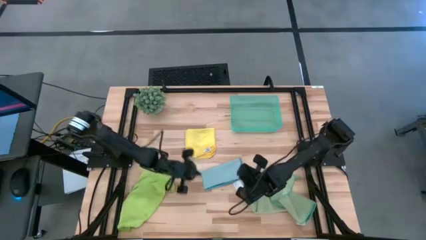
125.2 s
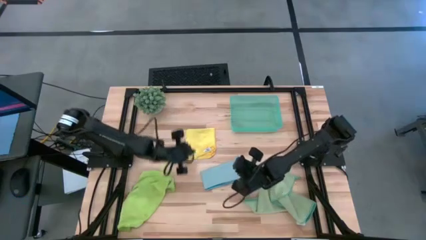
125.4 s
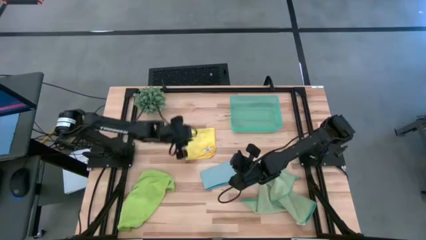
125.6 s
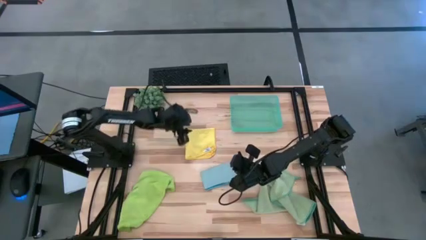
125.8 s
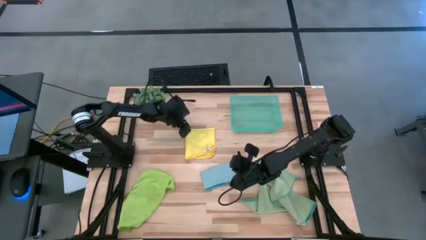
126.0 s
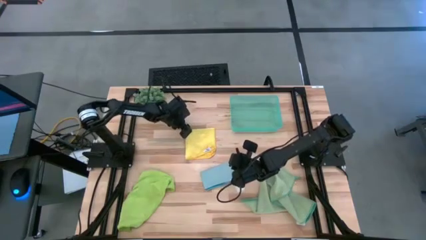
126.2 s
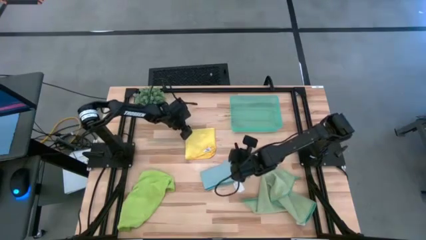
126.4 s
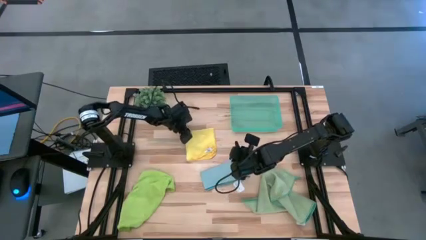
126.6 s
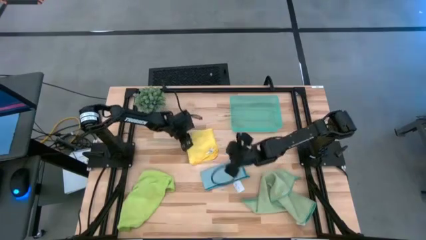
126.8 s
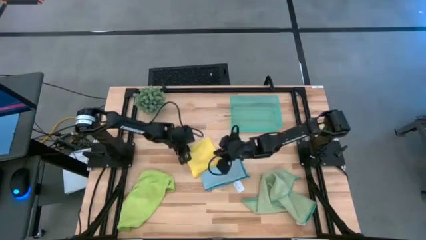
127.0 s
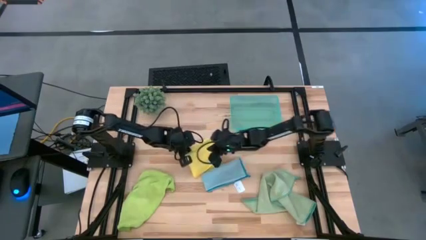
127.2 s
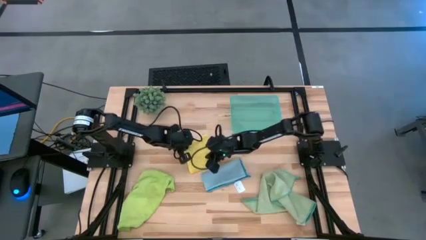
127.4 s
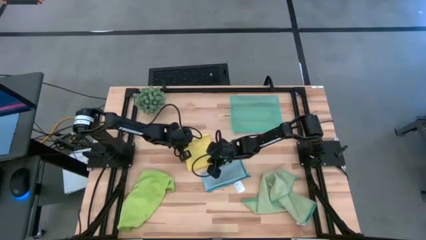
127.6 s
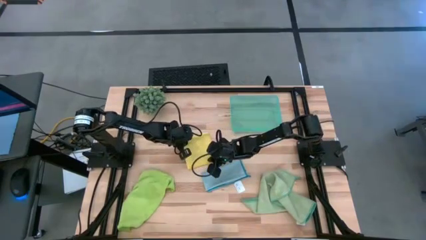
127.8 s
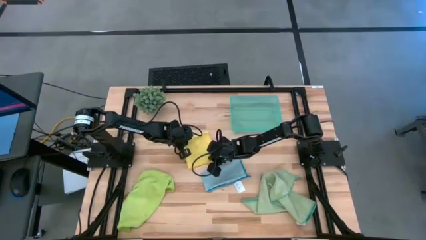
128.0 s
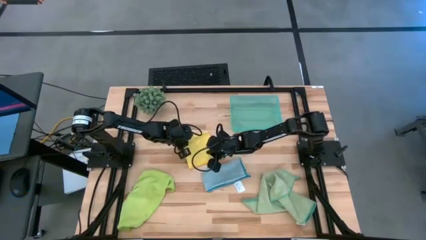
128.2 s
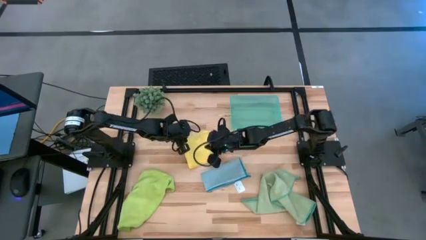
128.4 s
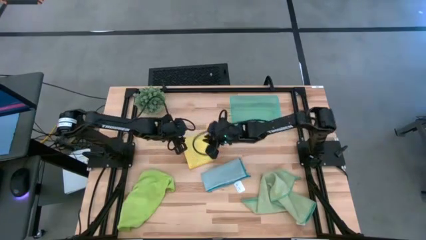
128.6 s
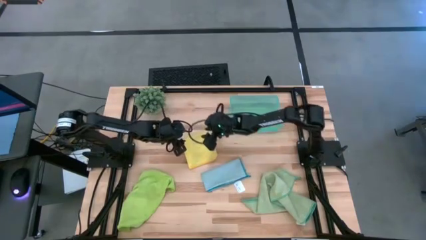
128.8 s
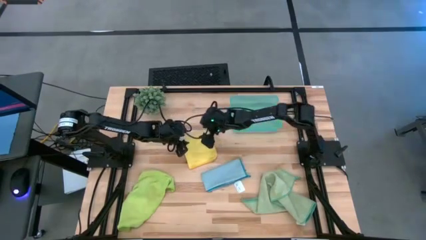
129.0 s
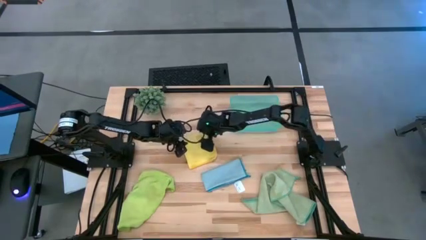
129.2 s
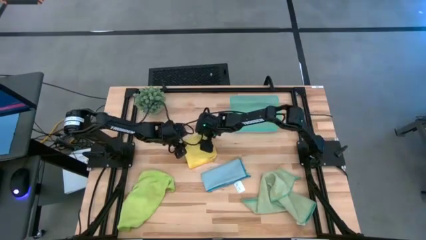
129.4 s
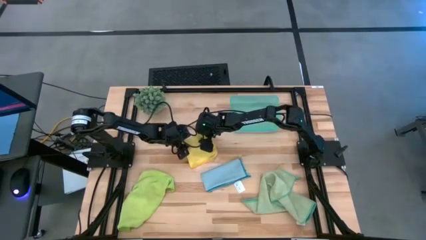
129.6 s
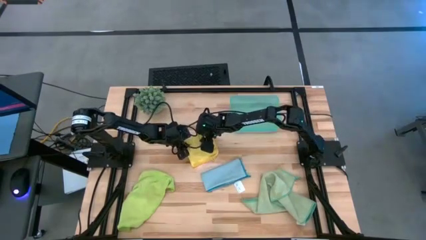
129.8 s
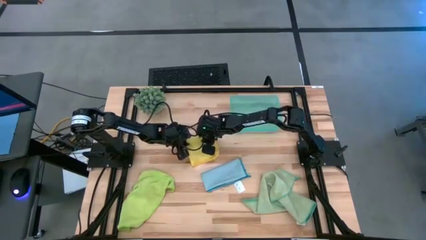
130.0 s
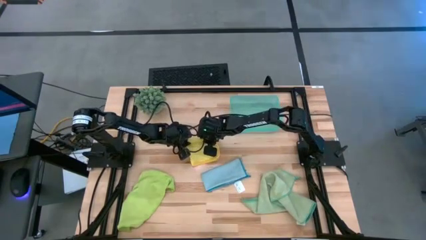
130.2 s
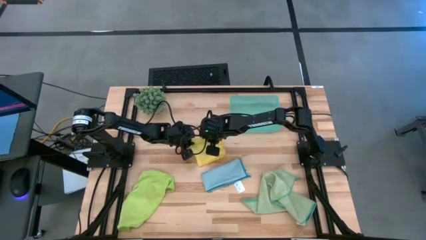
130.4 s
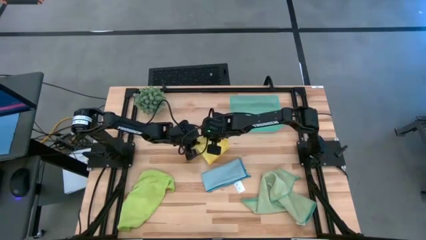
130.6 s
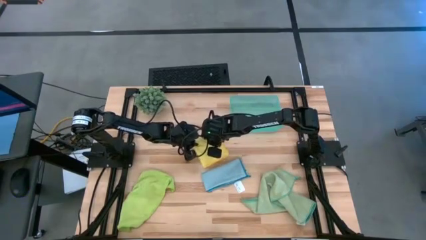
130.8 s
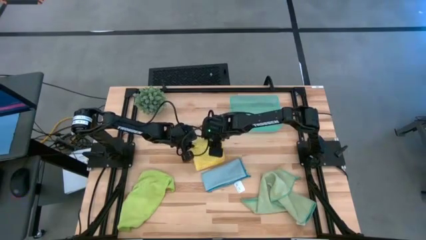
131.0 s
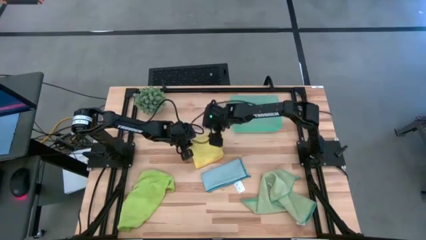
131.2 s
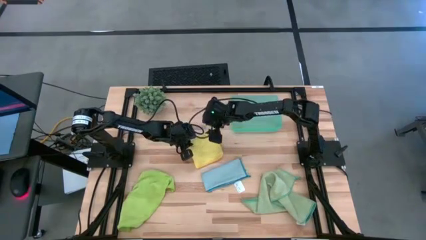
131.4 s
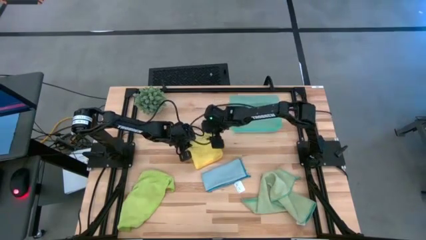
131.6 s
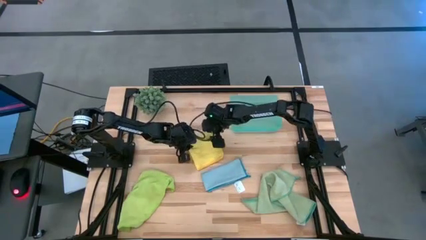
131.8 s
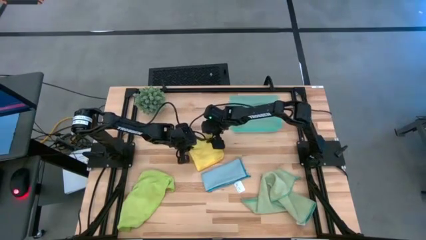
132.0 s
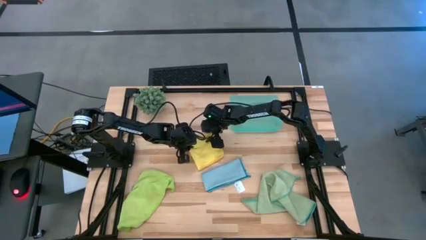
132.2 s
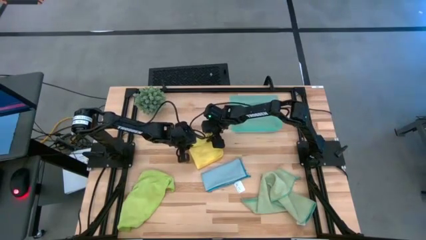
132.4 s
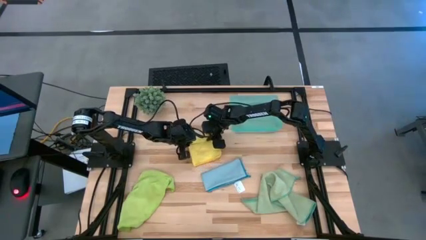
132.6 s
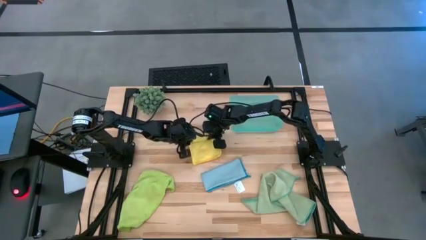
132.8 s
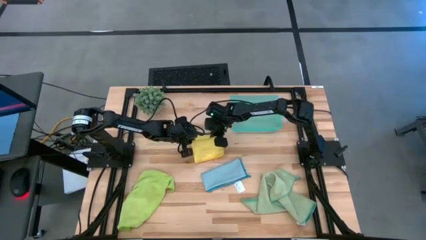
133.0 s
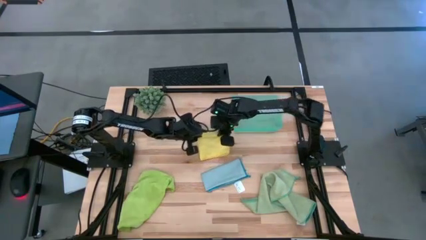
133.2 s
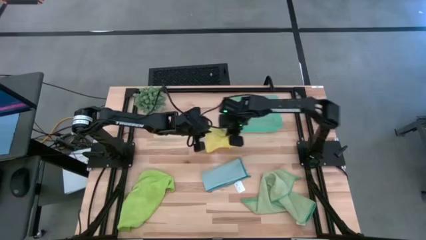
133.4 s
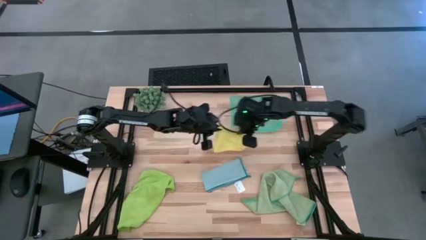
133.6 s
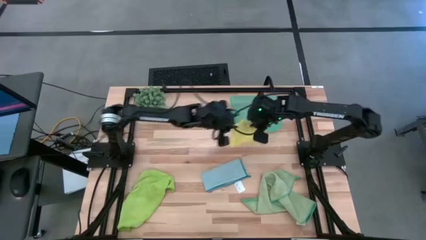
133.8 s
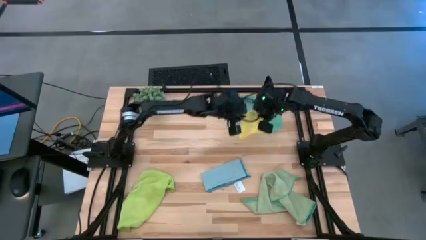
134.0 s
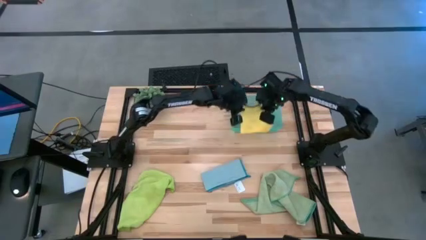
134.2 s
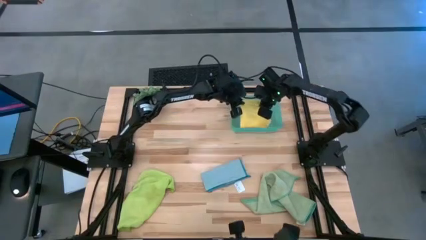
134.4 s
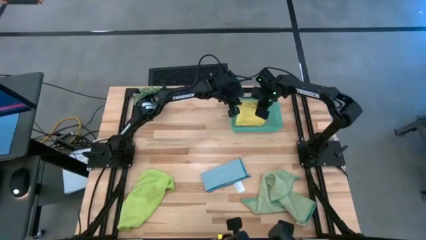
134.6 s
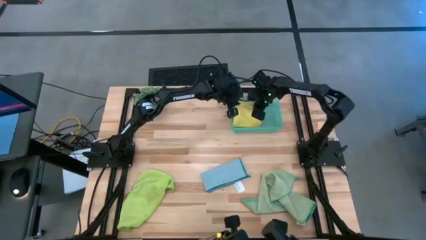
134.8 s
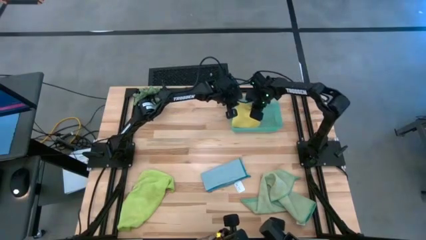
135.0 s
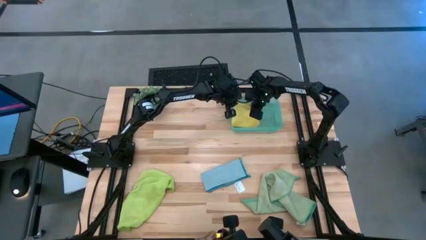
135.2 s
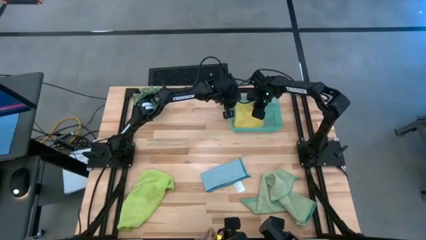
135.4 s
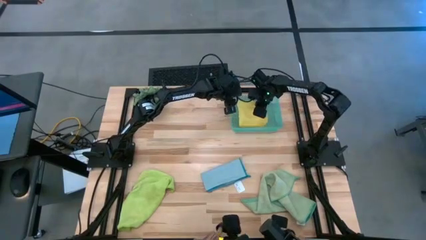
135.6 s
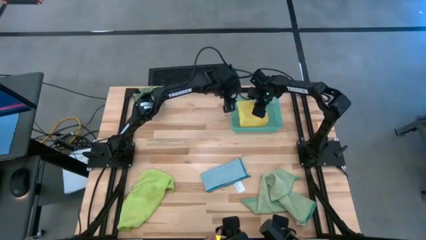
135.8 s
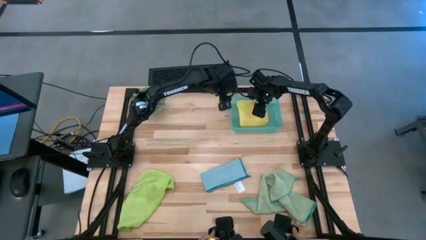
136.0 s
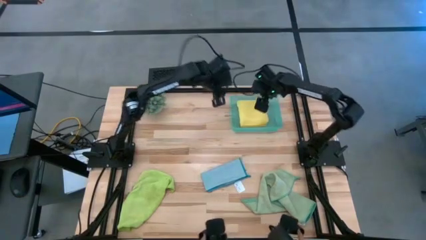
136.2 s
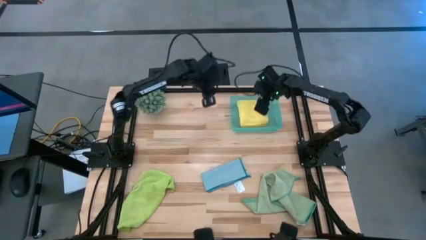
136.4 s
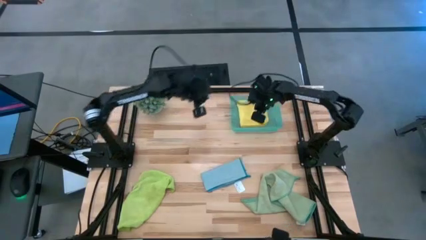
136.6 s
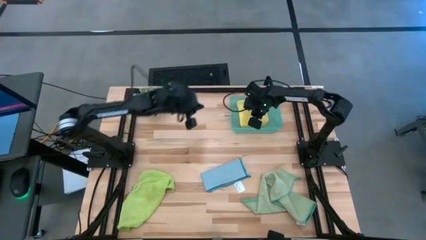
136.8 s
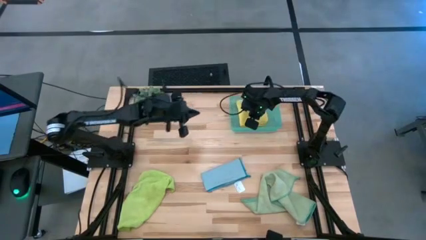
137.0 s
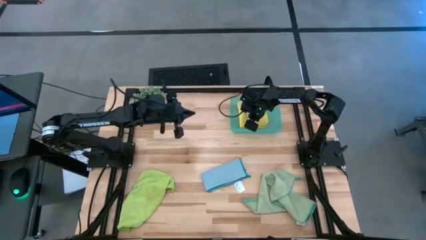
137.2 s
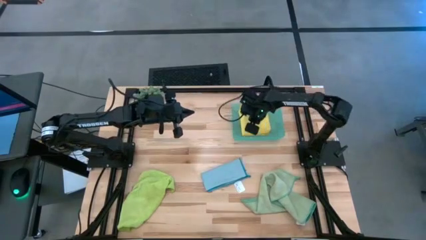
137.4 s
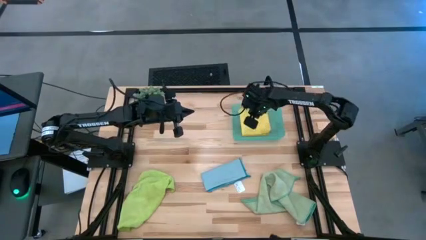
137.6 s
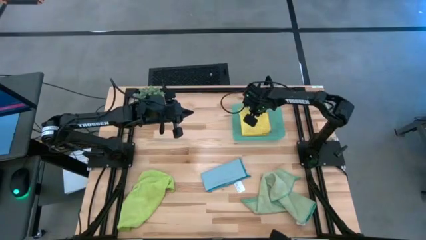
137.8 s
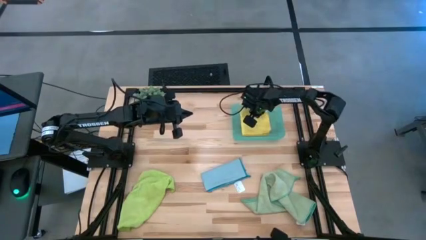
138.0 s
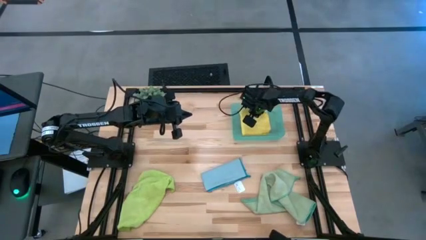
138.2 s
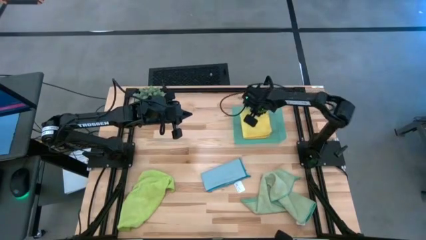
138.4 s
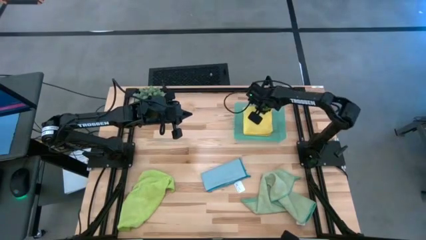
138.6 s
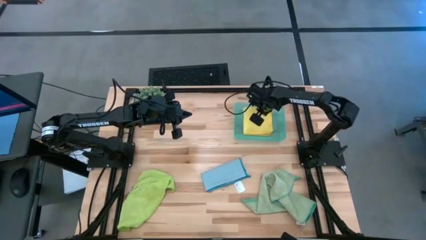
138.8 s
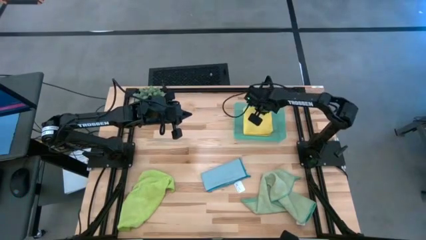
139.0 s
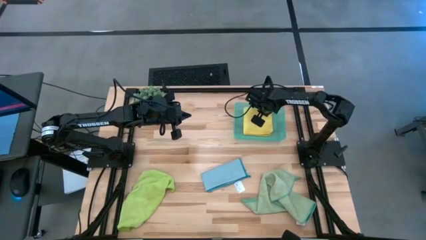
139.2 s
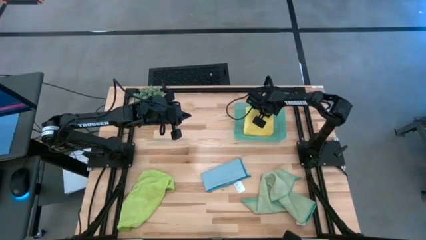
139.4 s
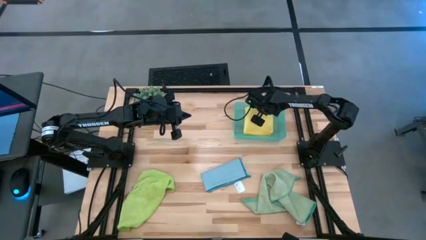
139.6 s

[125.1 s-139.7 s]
Task: Fold microfiber towels
Put the yellow microfiber cloth into the blue bin

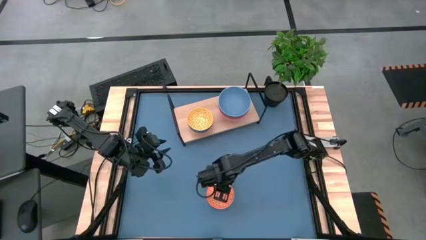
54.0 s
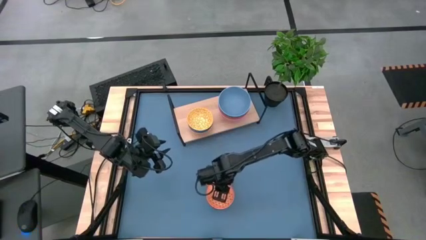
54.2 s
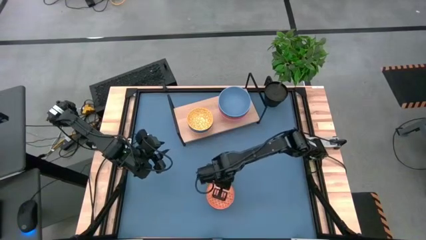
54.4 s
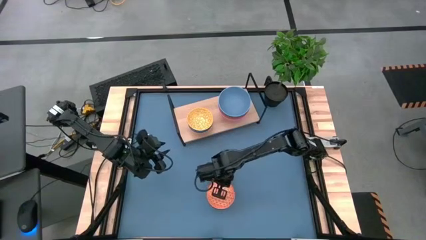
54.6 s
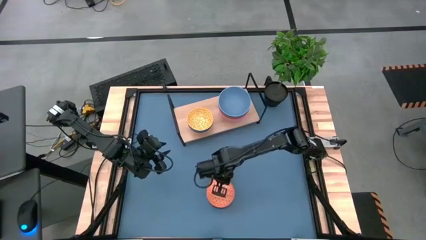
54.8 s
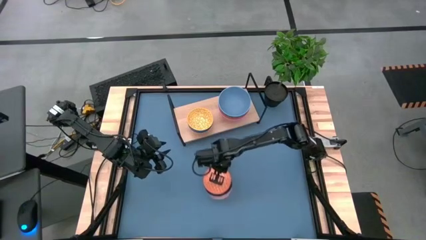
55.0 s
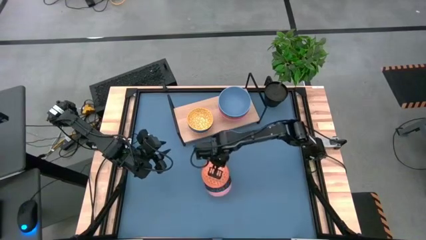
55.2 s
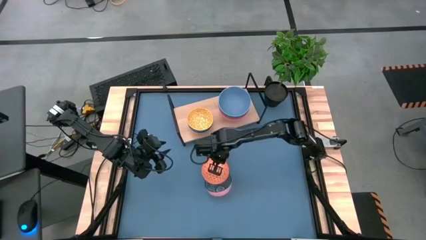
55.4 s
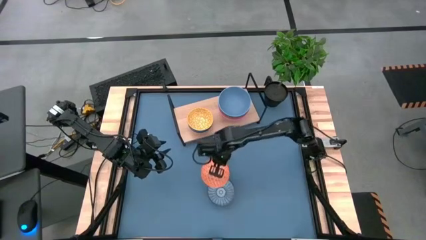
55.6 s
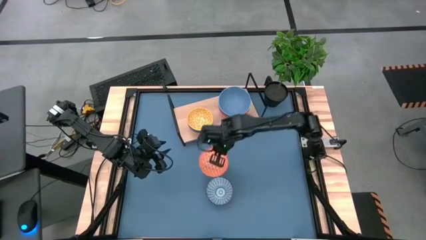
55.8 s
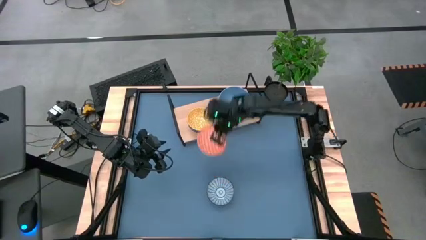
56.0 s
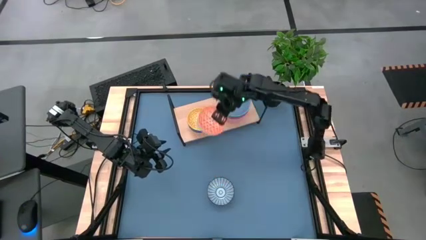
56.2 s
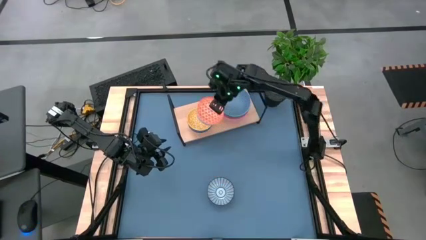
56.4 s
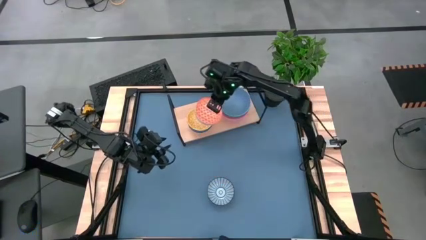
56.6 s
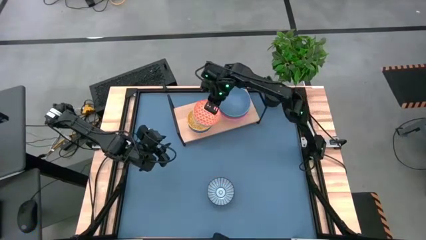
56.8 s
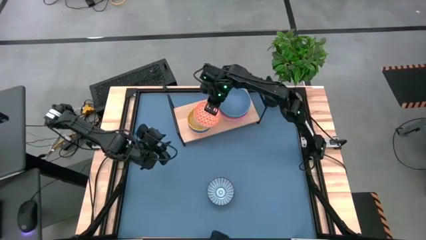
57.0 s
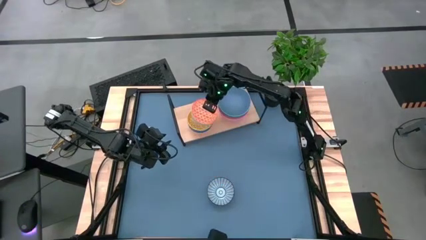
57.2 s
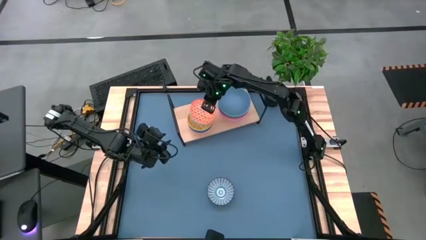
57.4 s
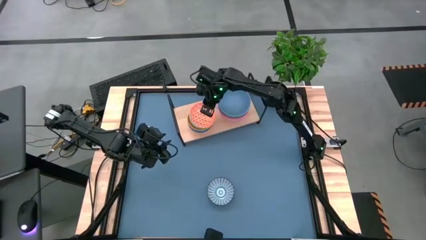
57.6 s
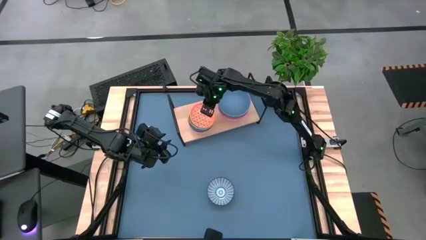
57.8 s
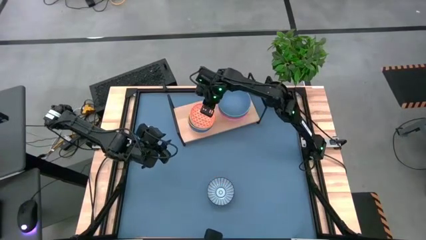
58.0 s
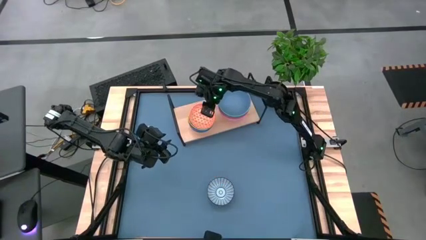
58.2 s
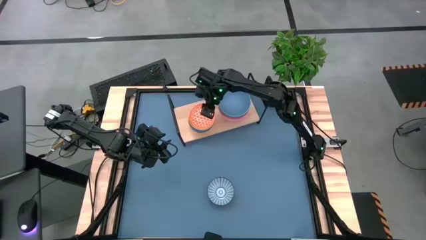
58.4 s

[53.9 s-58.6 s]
Task: Place and stack bowls onto a shelf
Stack the orange bowl on top of the yellow bowl on the shelf
